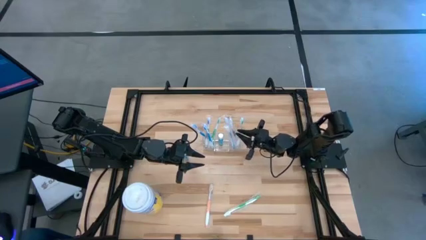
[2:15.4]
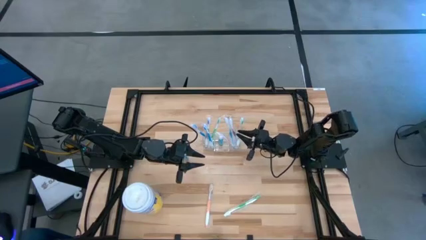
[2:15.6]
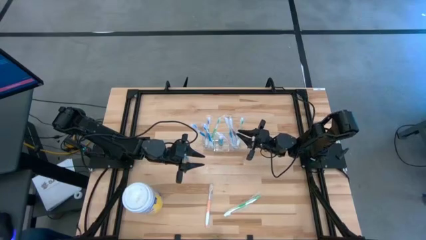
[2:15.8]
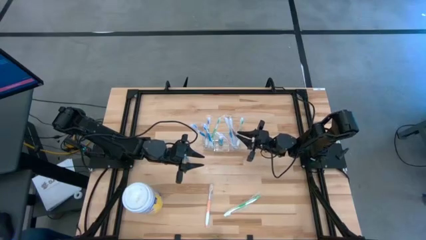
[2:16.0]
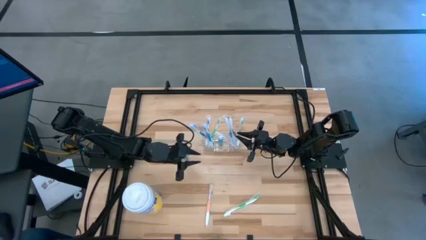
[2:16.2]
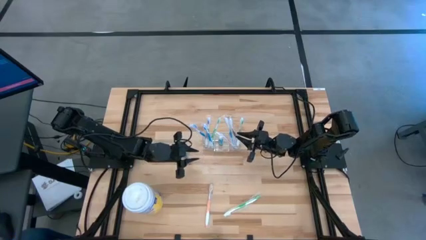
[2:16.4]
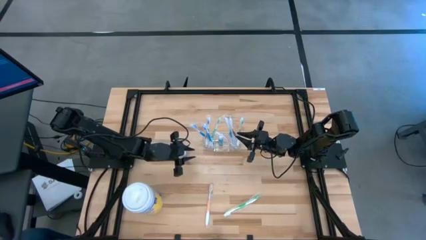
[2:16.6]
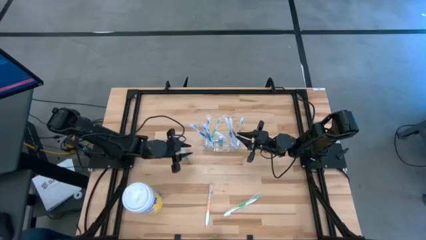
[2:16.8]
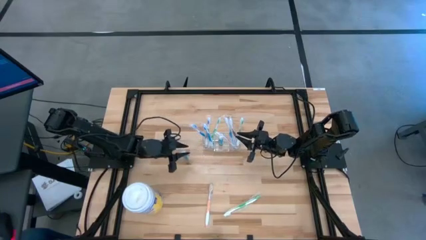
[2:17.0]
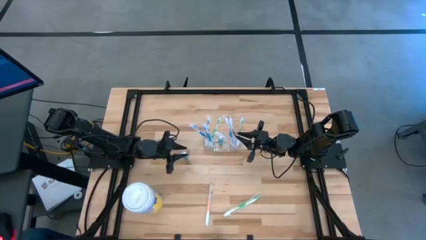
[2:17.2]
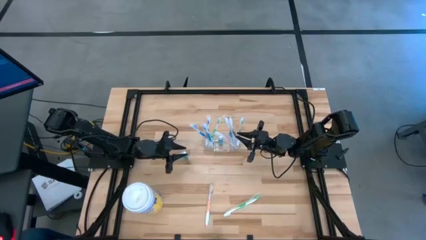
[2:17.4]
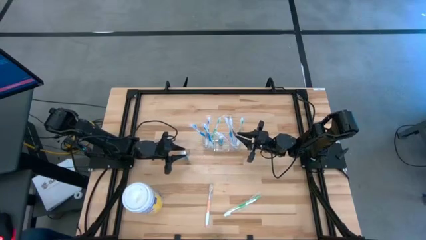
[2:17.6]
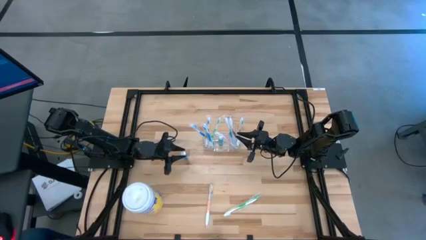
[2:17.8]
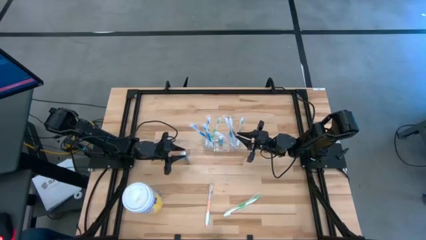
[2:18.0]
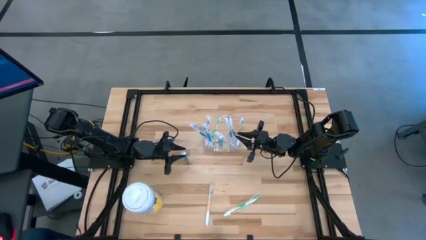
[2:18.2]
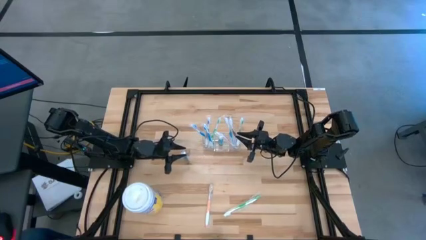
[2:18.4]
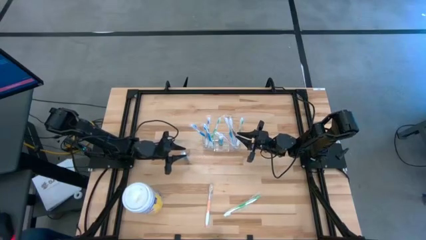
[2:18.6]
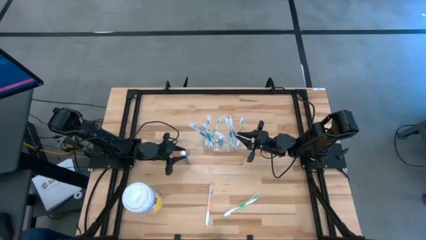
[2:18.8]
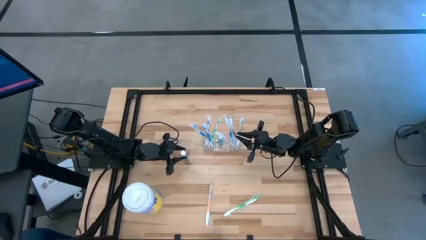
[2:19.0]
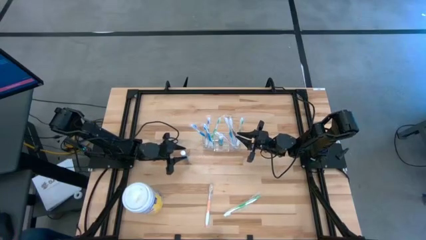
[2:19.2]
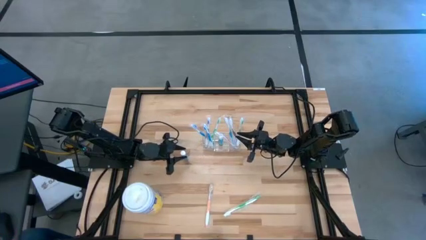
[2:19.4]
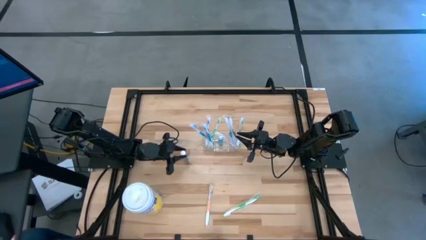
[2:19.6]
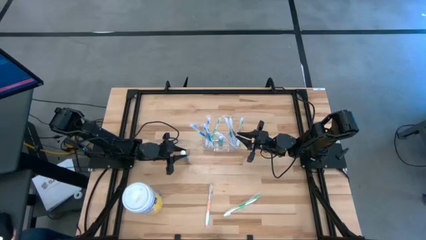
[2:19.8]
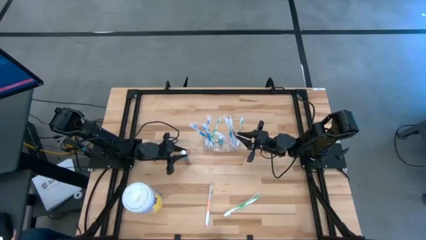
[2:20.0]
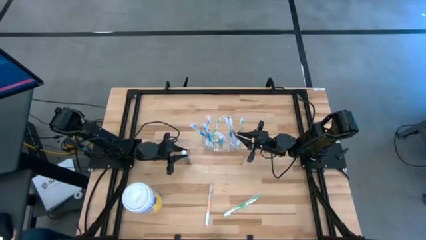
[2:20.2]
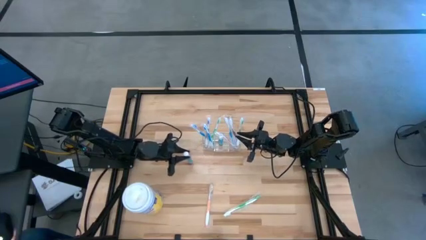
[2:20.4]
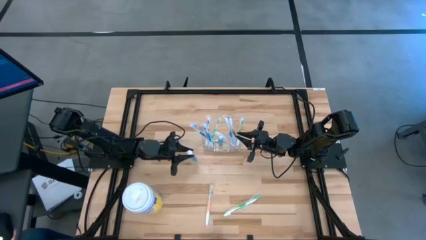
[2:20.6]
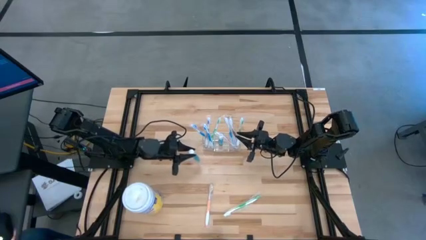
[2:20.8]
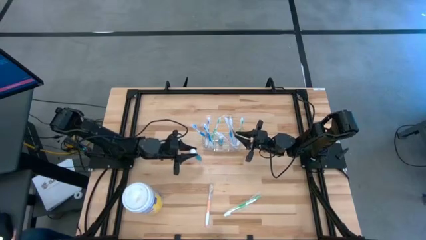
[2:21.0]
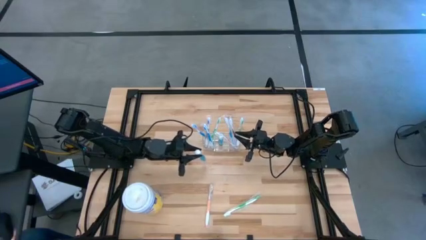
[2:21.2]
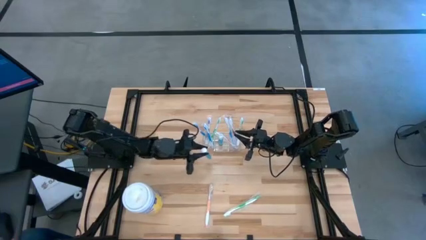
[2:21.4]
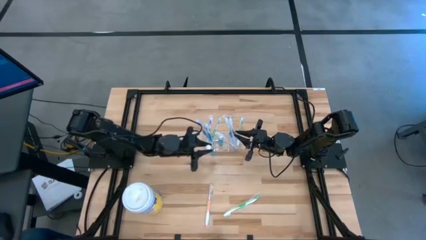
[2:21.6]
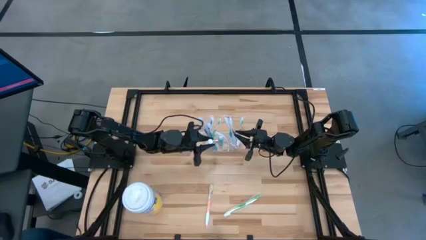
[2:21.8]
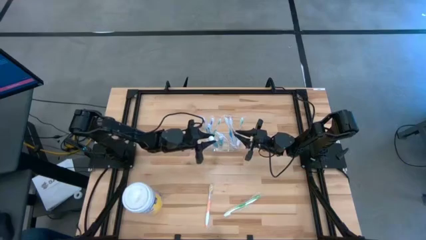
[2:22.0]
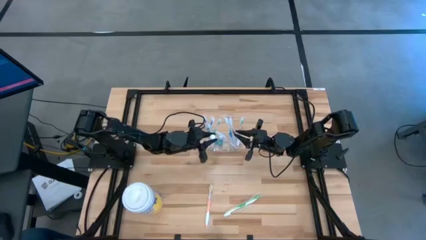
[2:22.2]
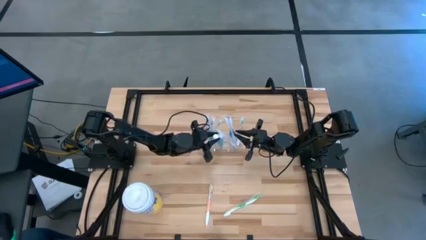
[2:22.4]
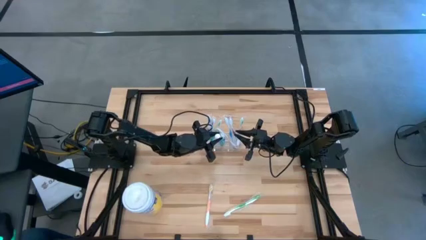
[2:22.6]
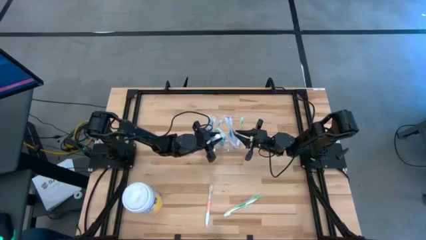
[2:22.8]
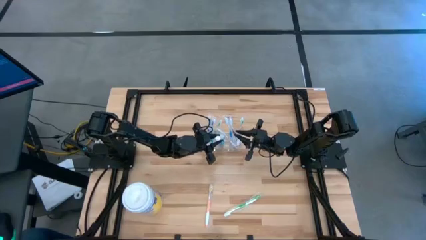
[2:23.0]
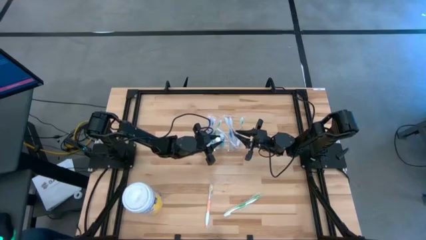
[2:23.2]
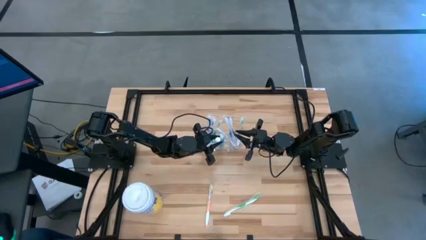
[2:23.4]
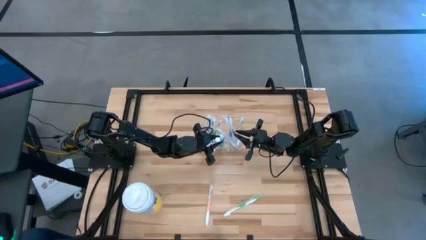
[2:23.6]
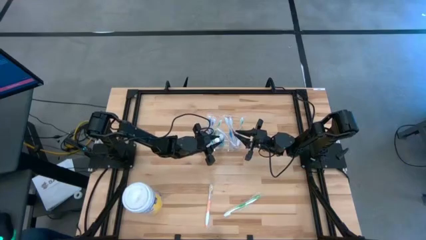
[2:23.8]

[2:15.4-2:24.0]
Task: Pick & Place toothbrushing station
Put the mouthwash into the transparent organizer

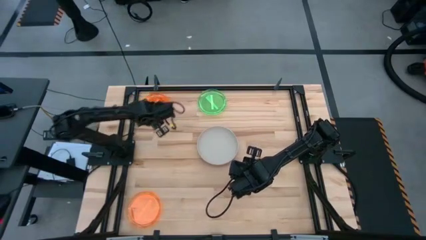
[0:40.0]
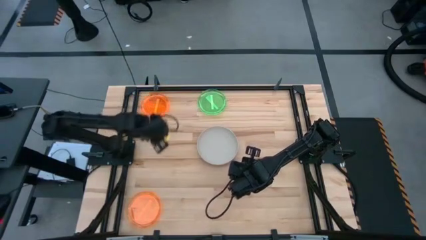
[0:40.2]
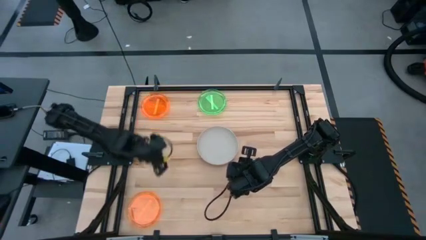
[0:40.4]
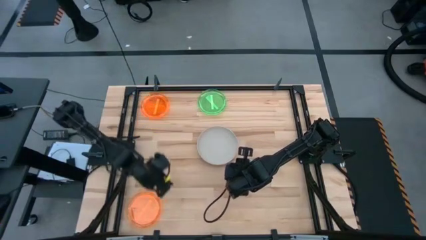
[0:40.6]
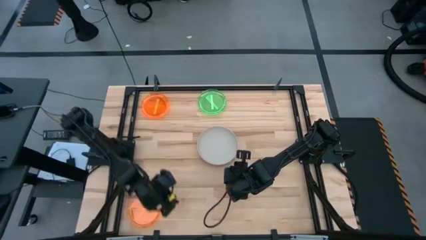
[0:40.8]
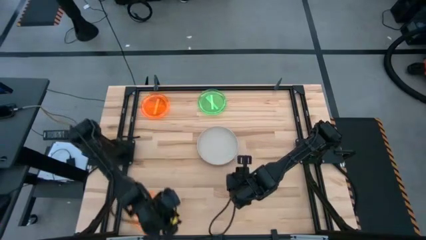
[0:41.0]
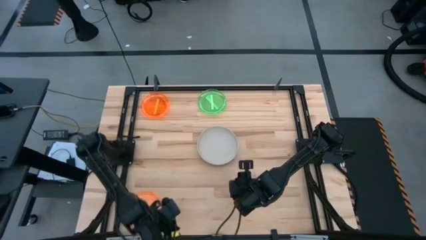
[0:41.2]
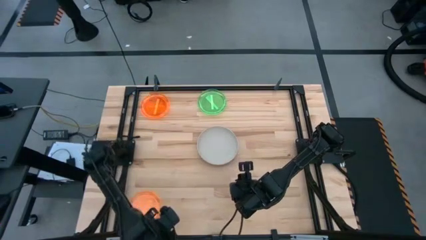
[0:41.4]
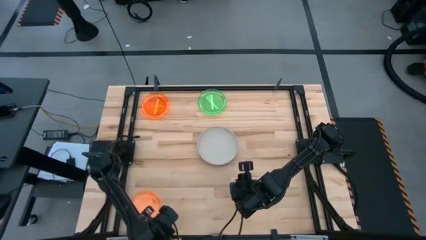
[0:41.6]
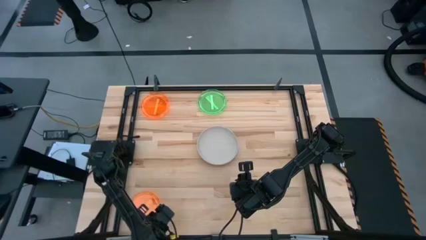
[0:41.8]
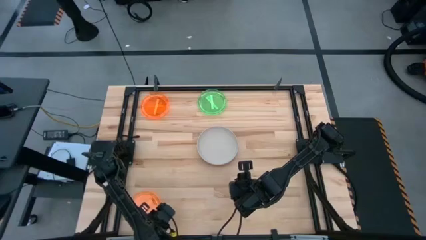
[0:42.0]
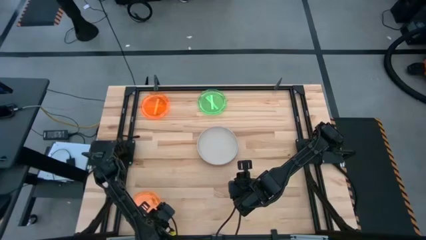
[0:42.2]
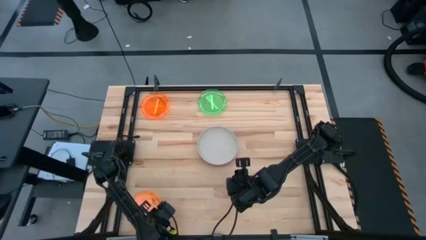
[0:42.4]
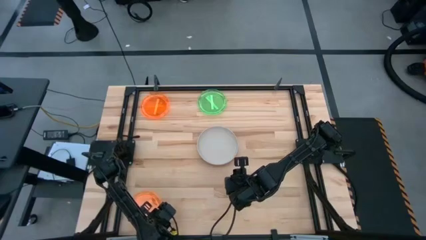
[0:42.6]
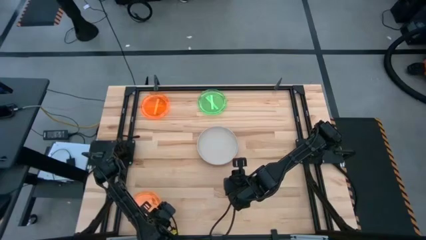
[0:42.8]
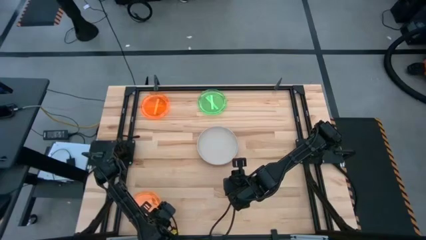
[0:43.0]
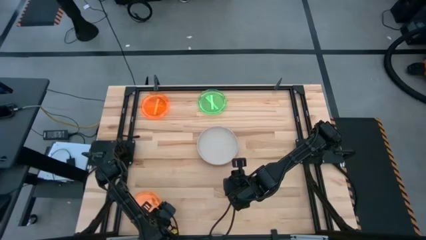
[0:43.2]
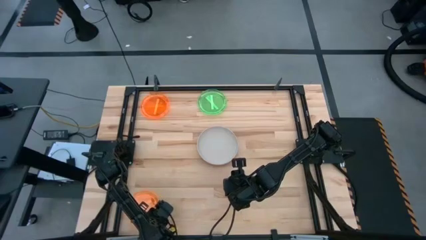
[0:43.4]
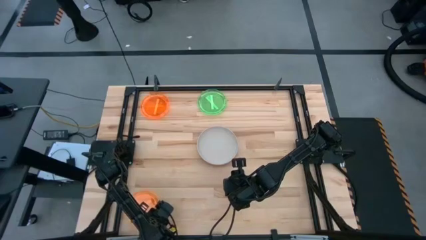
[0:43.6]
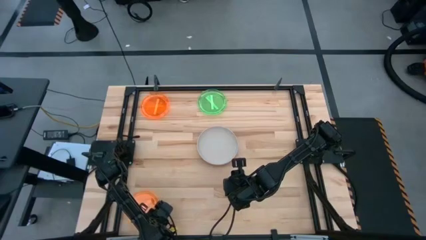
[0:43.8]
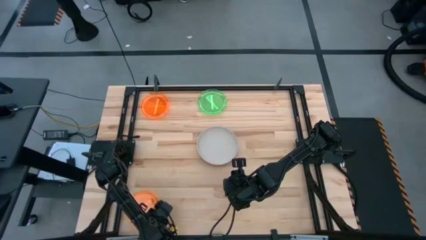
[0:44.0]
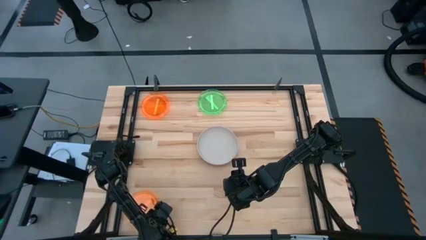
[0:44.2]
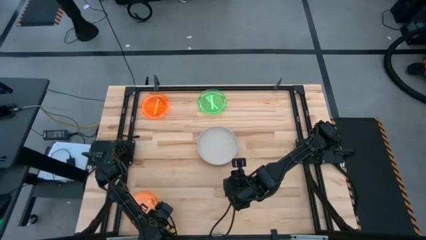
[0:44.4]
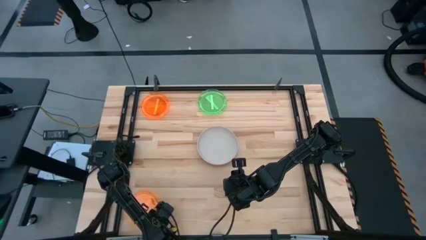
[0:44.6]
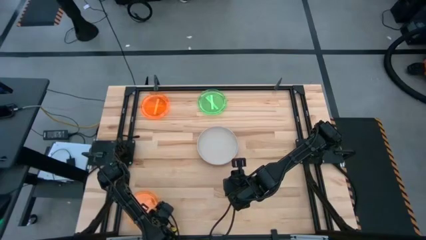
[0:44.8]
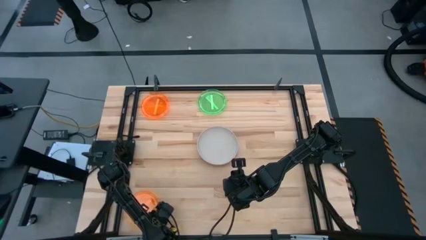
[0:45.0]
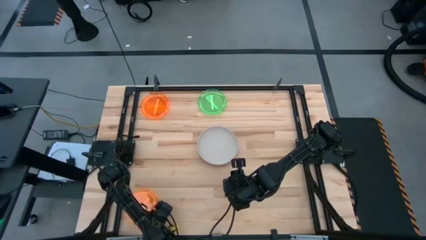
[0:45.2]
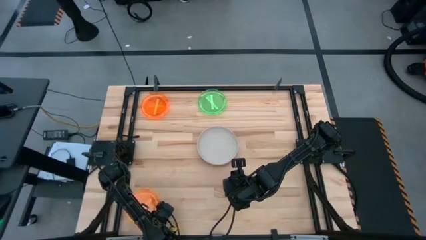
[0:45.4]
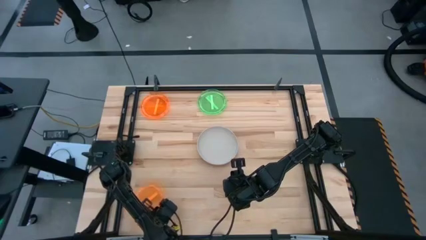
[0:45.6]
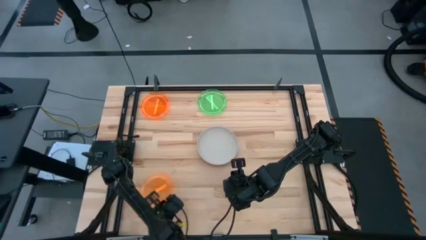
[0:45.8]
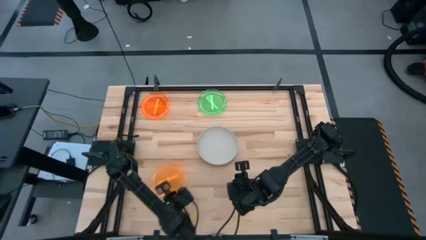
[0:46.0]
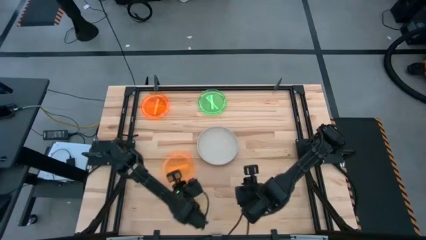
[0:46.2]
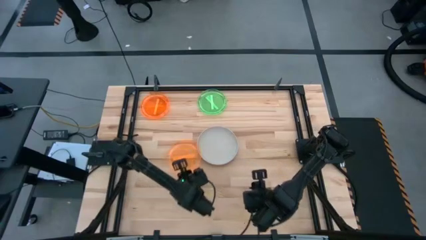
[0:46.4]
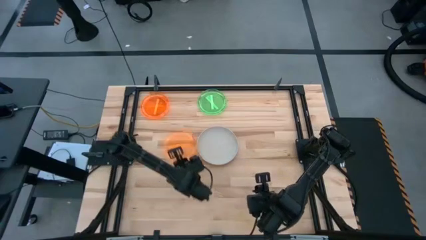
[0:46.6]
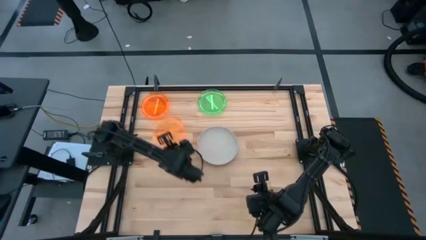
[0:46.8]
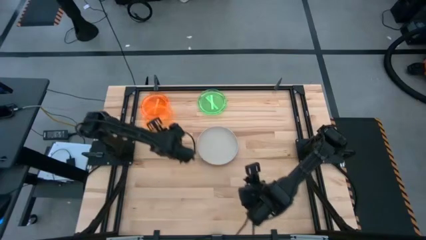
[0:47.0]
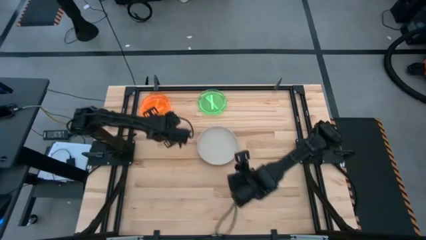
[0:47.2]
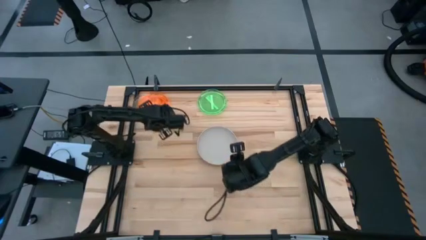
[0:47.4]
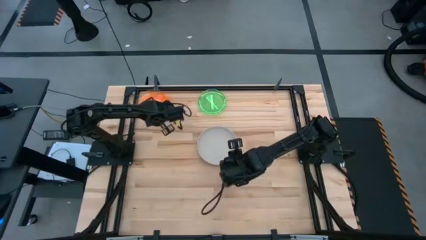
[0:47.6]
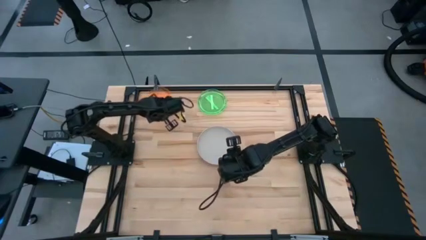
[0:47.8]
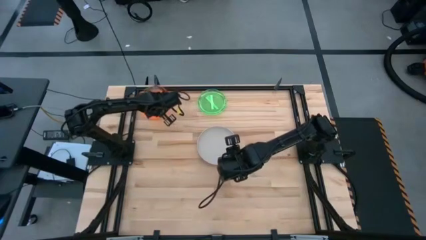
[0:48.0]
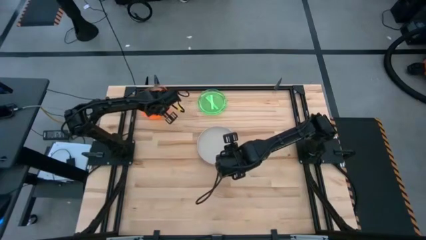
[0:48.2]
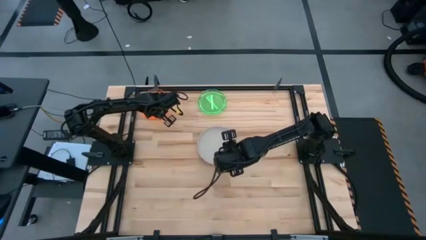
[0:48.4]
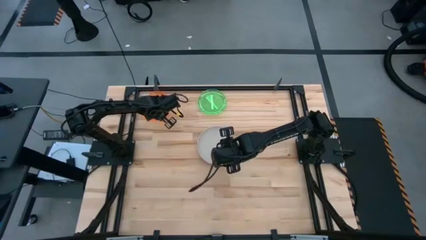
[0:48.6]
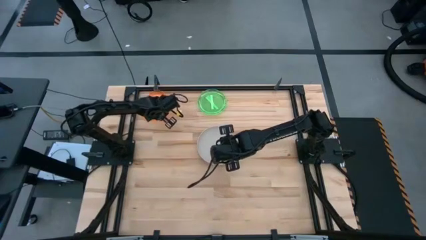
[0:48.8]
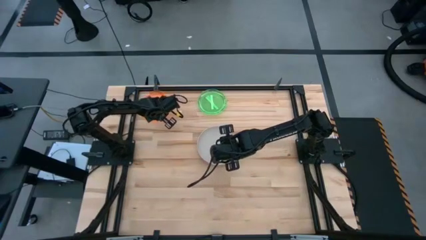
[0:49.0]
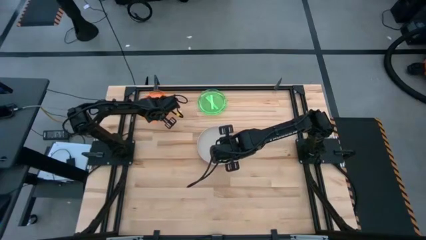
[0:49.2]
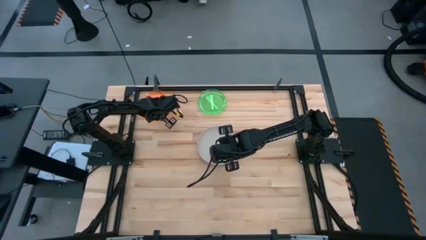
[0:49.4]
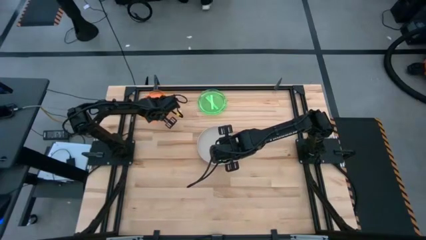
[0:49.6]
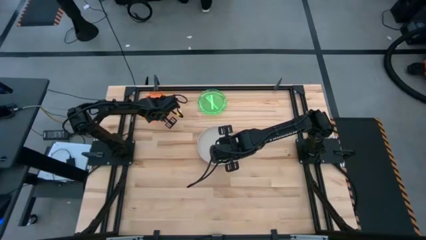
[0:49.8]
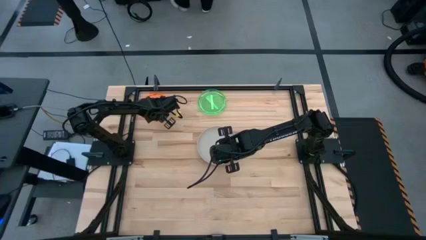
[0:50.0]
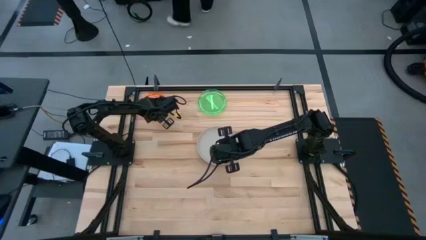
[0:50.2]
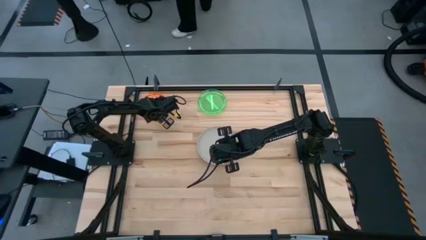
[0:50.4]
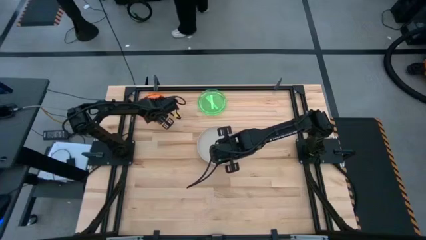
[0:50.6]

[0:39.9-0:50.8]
Task: Stack plastic plates
Stack the bottom orange plate on top of the other orange plates
